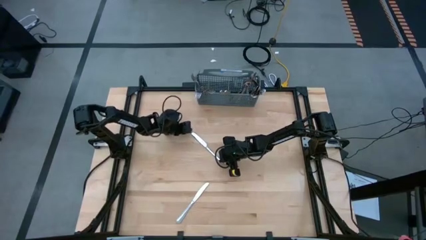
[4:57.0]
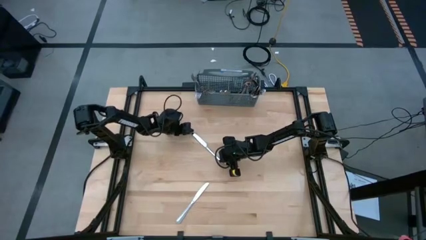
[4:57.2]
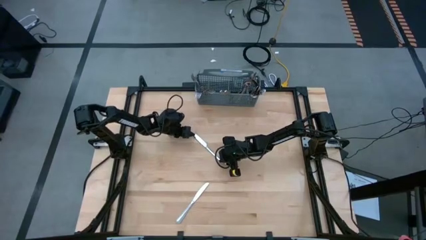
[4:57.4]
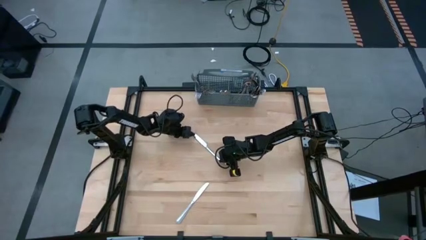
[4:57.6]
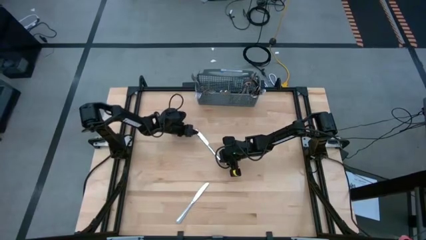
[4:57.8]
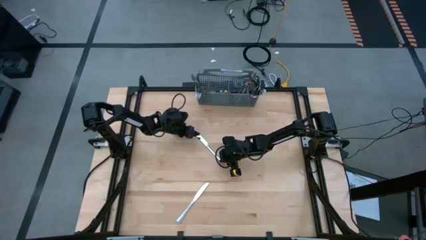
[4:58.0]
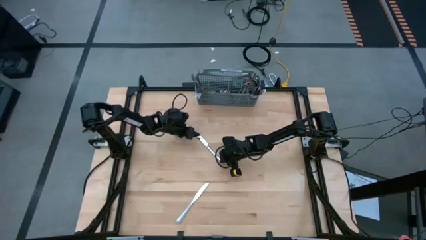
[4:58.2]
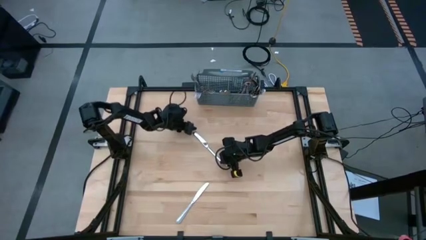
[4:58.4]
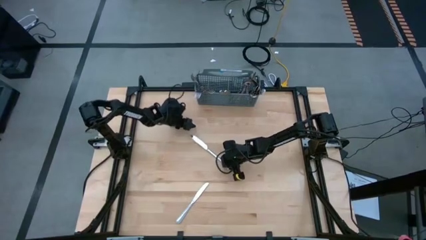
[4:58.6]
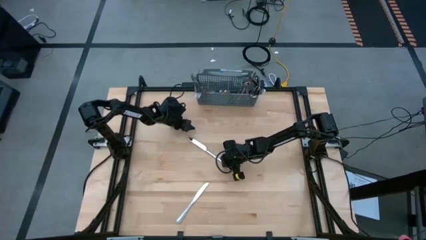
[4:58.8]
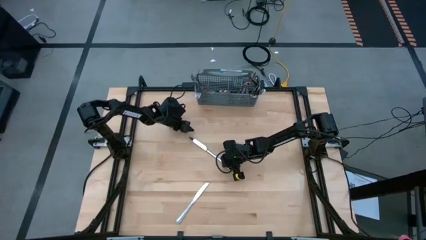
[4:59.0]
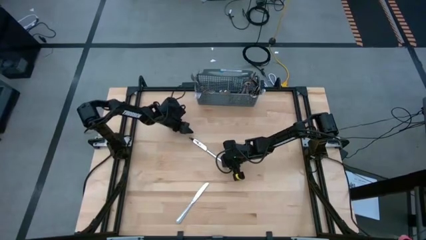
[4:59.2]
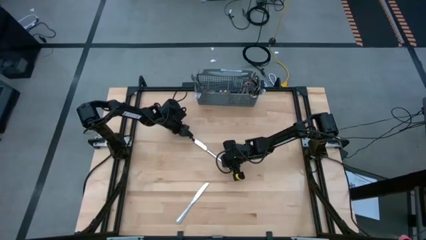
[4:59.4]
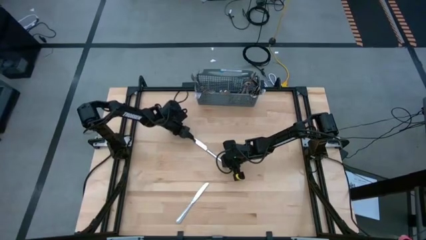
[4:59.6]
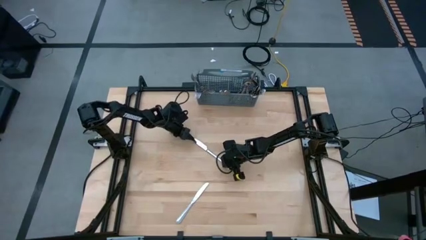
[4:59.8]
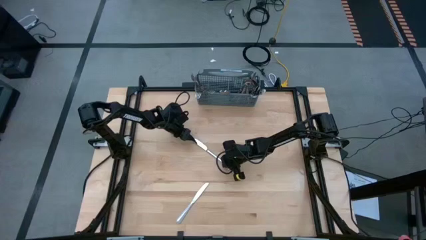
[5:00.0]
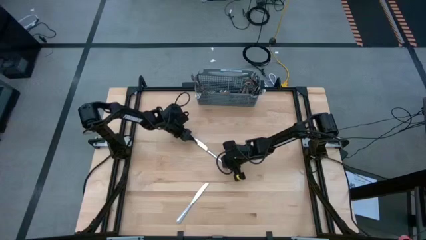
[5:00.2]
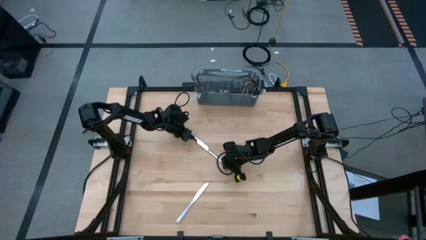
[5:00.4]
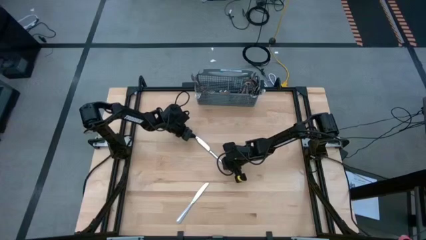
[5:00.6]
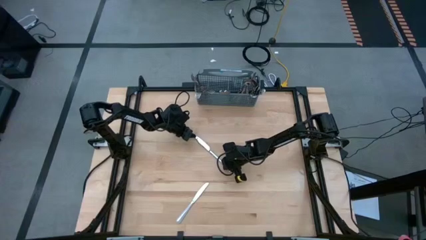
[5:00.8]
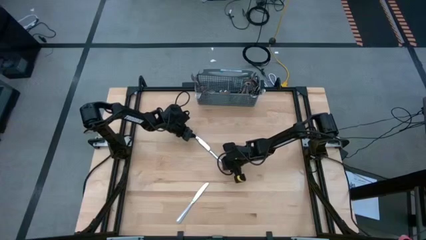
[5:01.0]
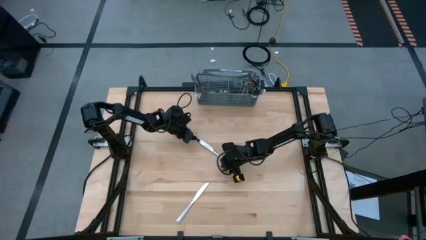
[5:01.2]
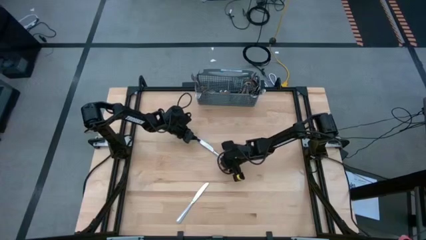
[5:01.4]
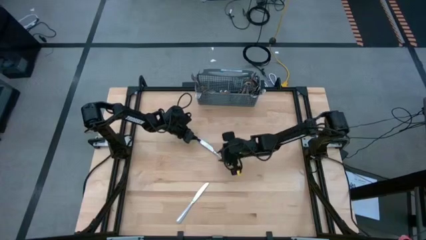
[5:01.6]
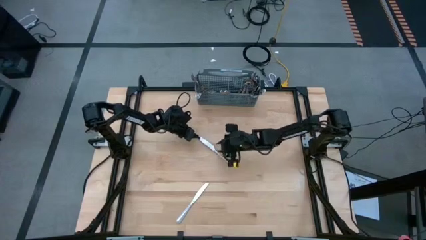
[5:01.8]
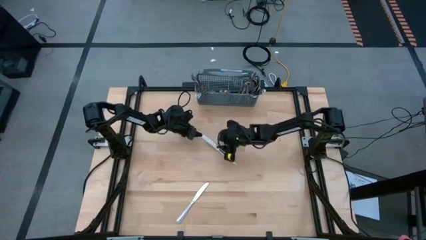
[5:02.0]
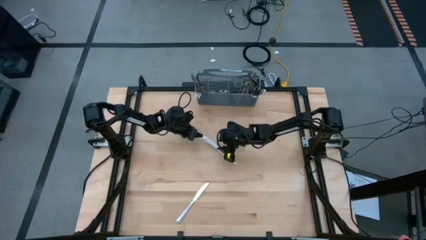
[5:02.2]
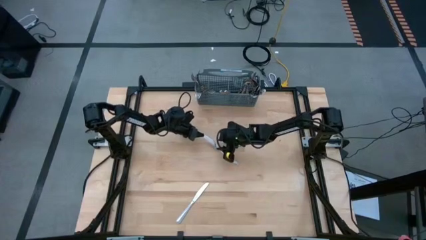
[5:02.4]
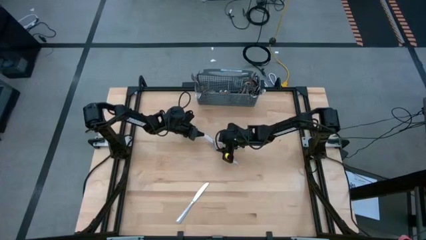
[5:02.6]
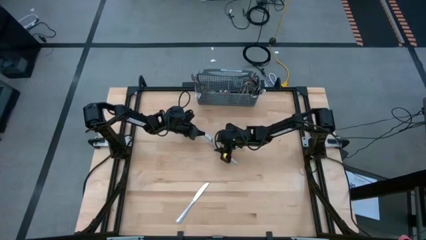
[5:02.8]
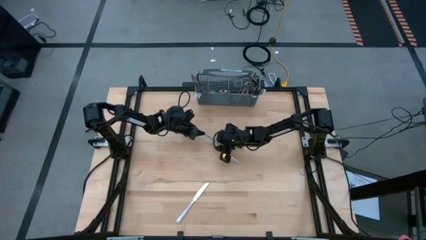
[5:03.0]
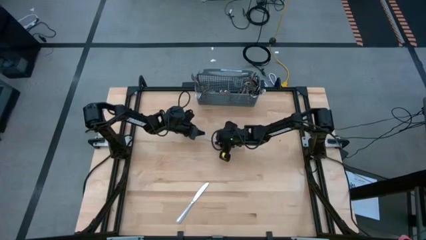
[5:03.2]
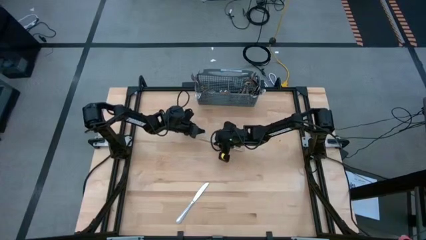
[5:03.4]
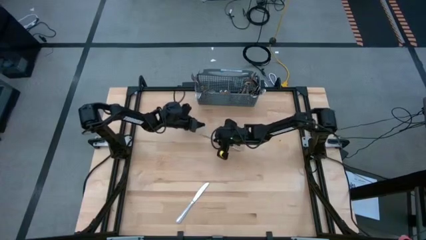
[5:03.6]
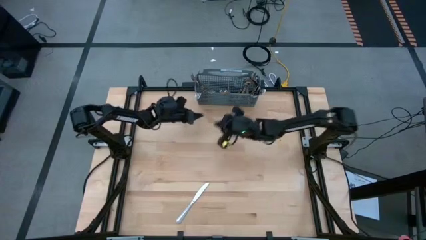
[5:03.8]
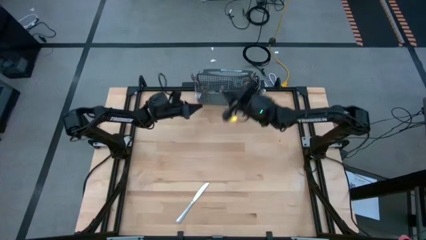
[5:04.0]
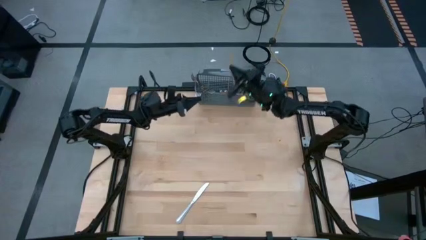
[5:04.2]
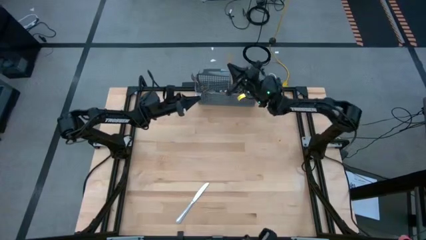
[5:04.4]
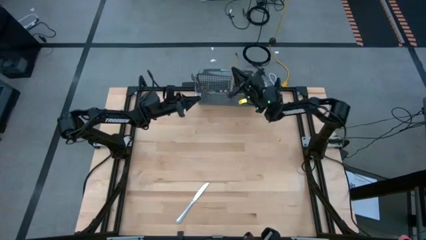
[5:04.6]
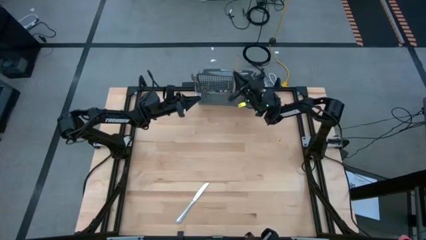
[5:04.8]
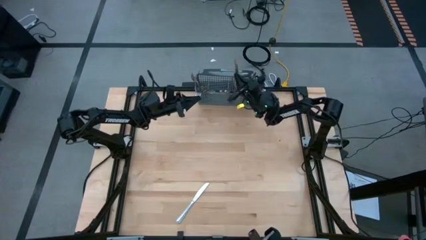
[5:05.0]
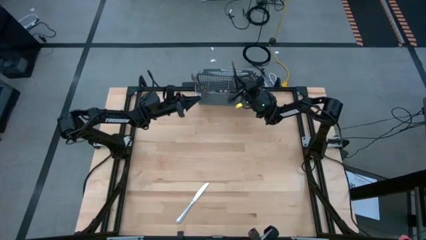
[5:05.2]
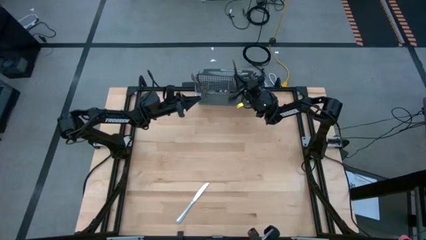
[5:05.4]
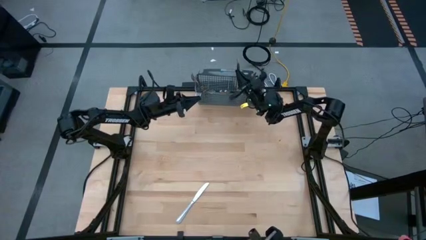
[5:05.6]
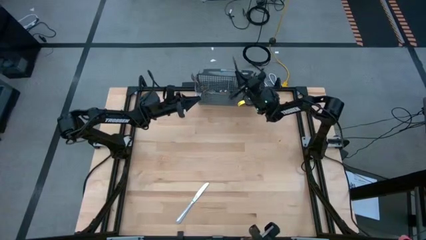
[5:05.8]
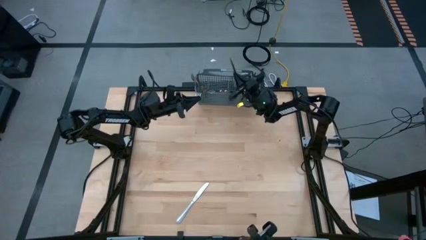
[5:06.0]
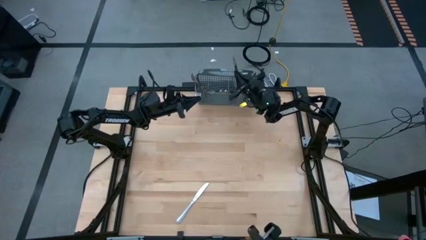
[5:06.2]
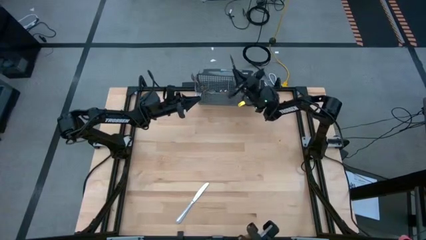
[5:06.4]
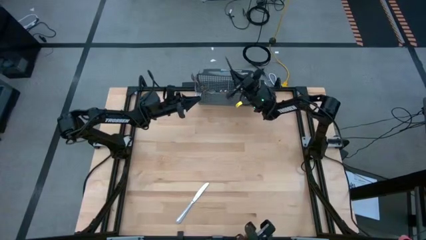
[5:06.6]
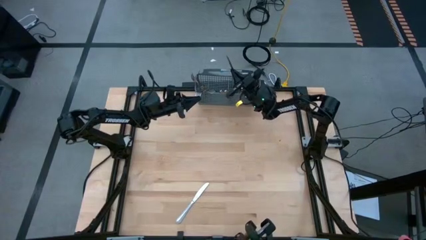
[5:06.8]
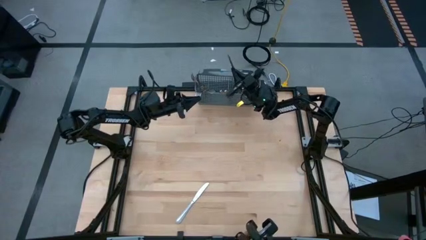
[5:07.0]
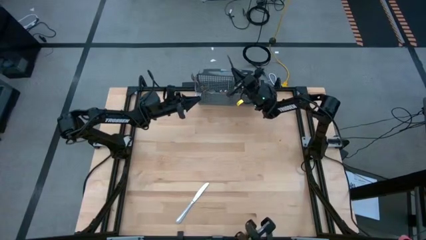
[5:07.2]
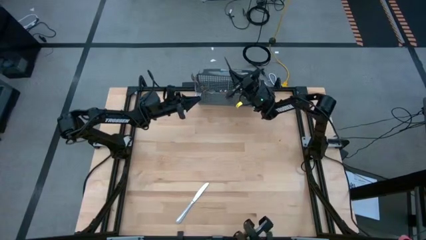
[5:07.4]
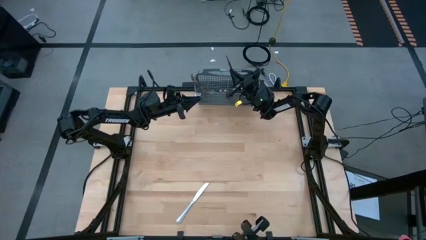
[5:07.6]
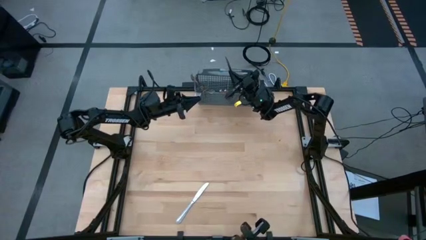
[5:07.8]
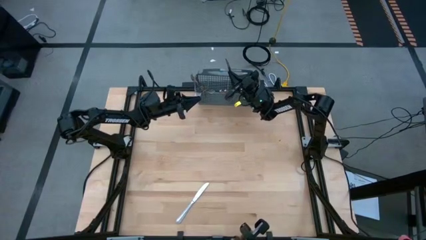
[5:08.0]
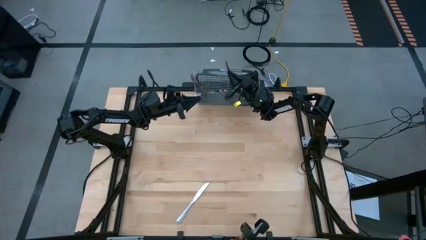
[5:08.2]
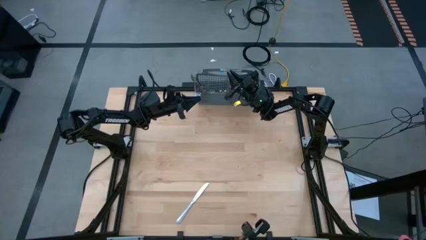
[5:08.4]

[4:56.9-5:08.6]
Task: Sort silverware
Put the silver table knife into the silverware organizer

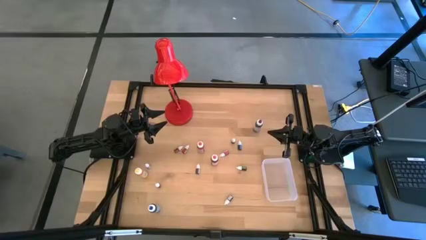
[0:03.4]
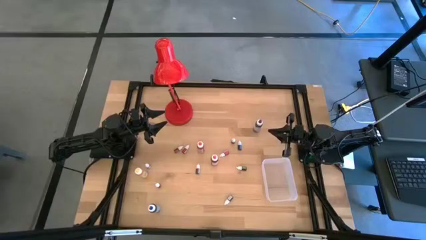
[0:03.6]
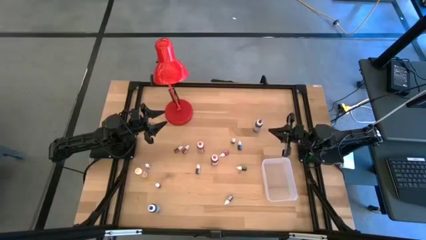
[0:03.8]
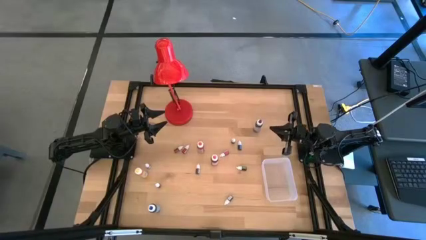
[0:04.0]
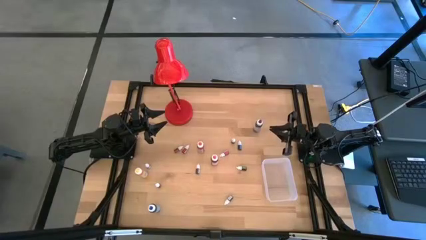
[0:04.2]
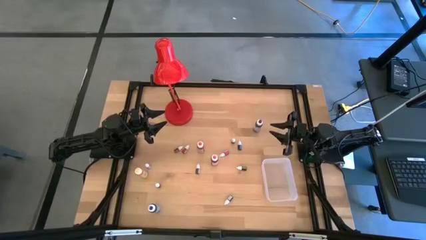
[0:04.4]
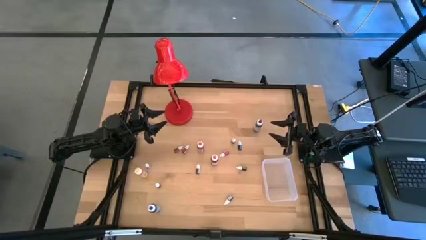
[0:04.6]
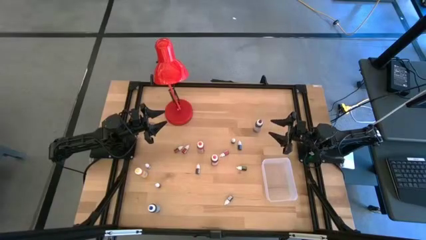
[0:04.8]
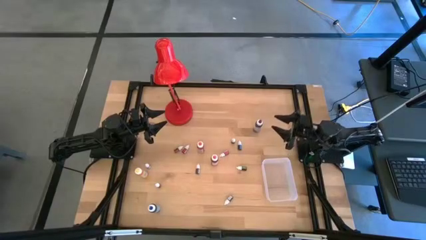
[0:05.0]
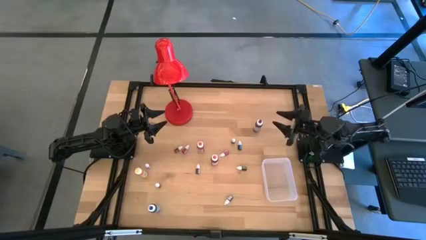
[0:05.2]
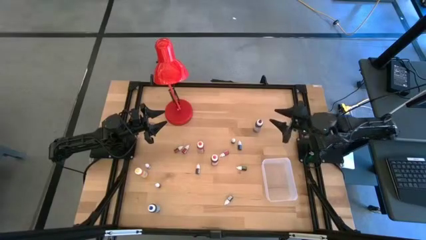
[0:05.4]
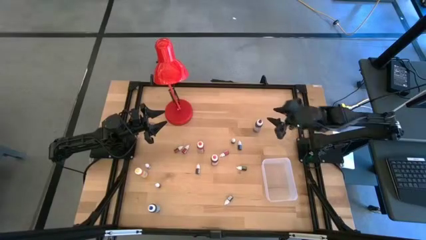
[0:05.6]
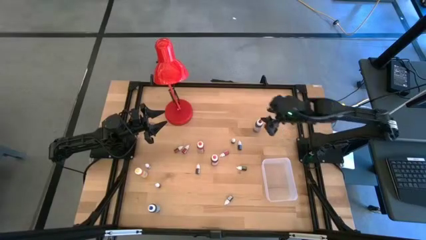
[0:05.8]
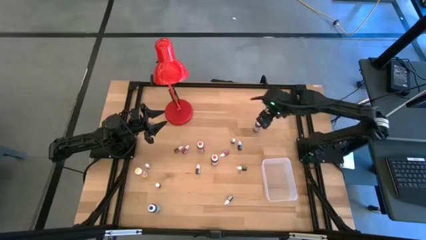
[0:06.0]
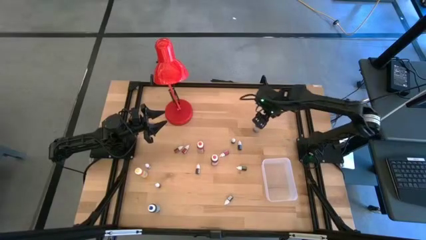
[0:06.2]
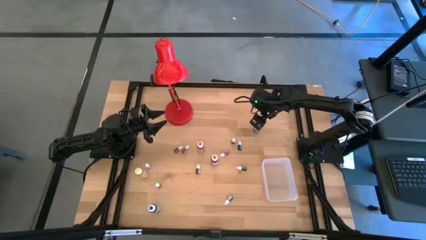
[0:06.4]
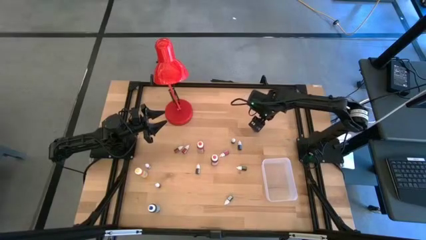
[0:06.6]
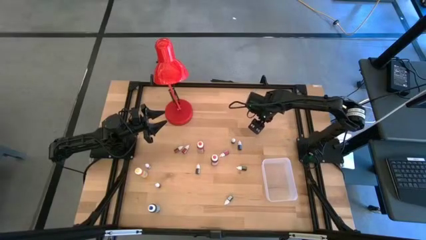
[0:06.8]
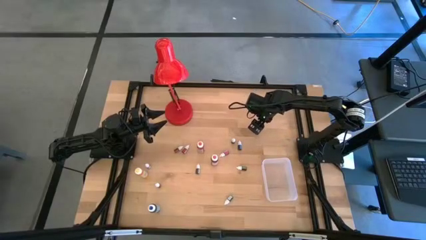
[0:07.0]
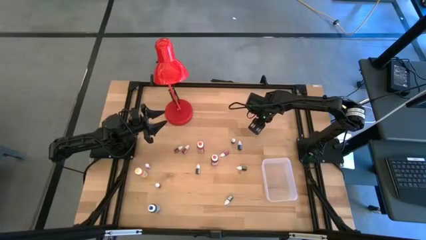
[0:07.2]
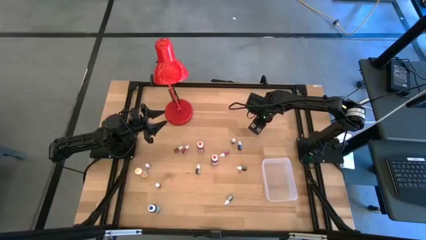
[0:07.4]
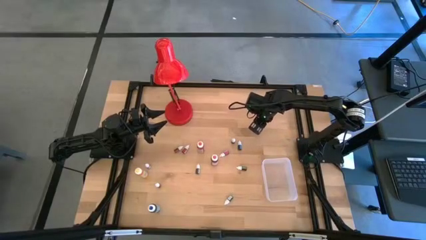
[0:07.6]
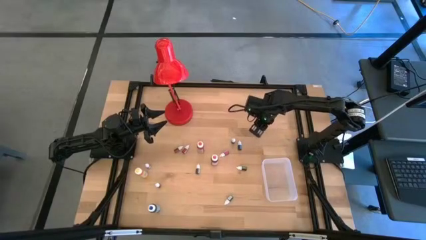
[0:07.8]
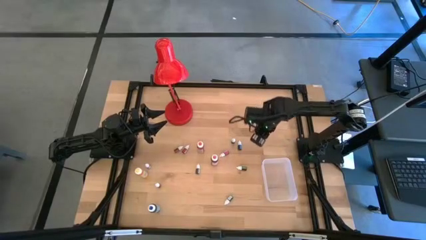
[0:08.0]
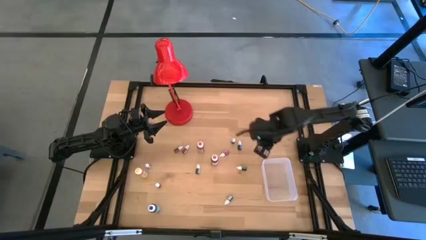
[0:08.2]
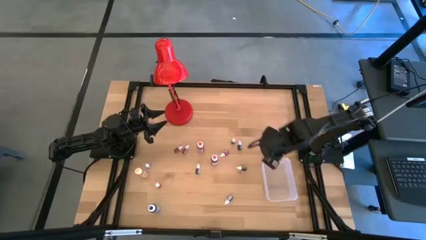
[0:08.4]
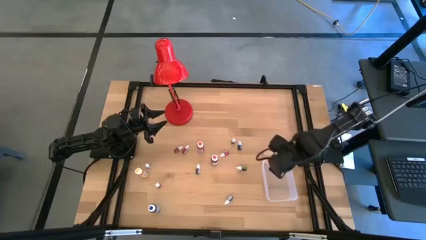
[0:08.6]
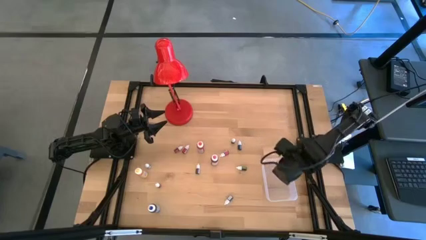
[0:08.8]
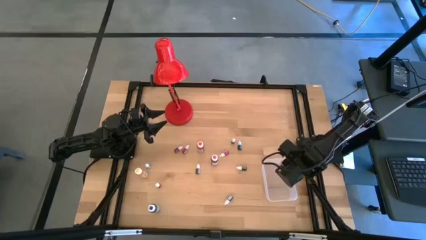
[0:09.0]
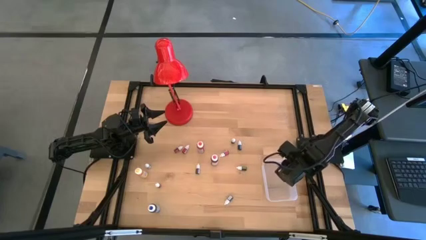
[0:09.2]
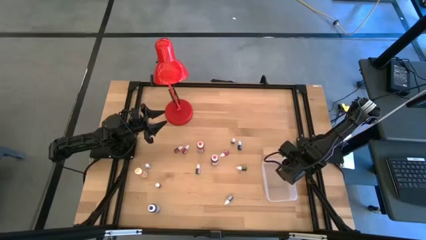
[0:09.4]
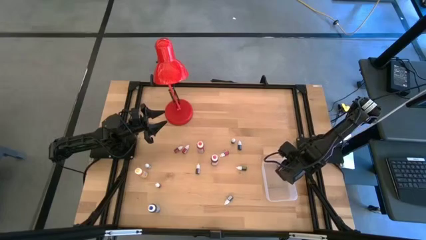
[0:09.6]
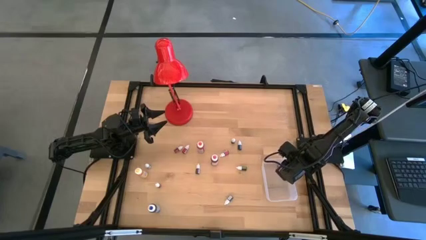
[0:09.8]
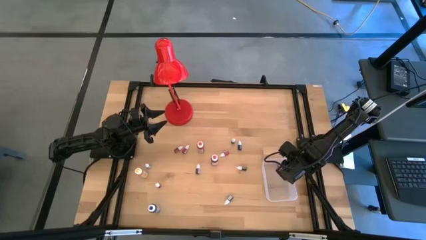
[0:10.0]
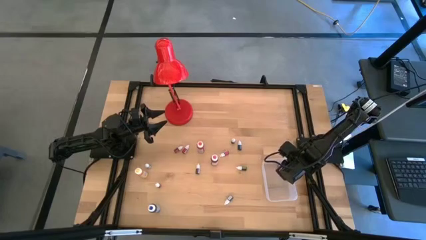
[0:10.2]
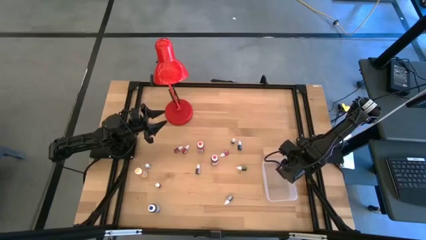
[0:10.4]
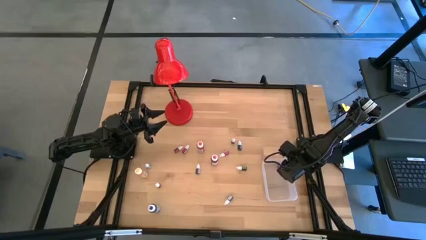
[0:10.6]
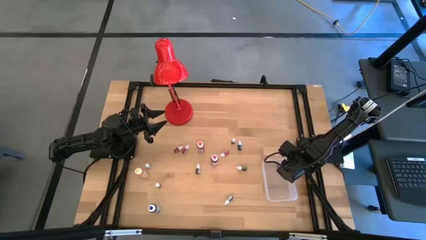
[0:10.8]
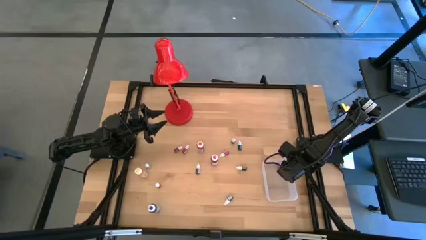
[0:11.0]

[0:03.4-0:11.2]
Task: Pick & Place food coloring
Put the big purple bottle into the transparent container
